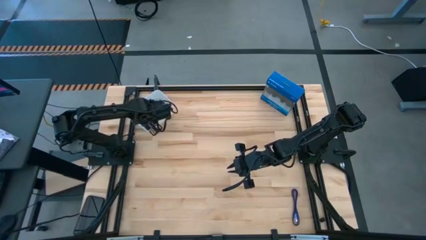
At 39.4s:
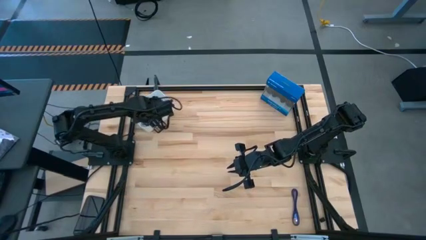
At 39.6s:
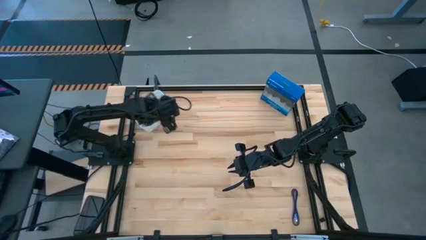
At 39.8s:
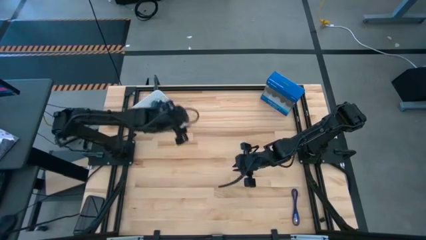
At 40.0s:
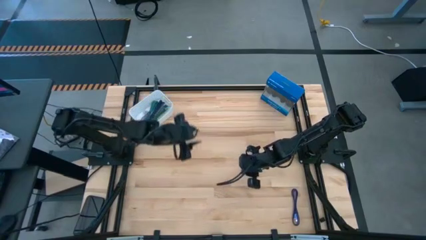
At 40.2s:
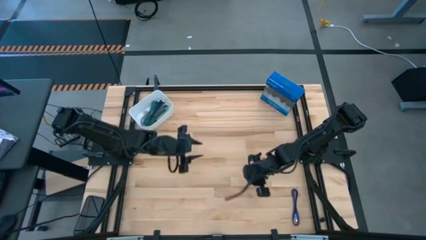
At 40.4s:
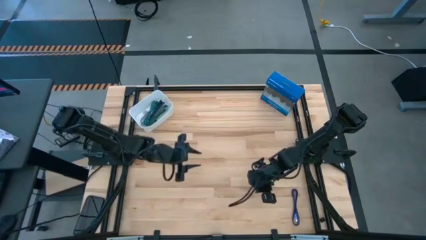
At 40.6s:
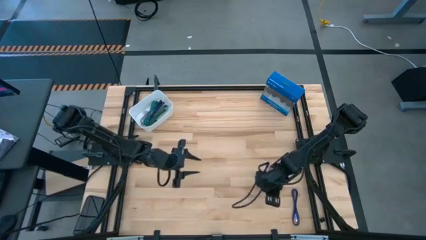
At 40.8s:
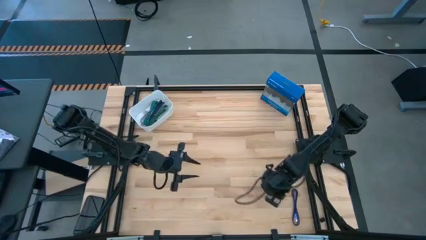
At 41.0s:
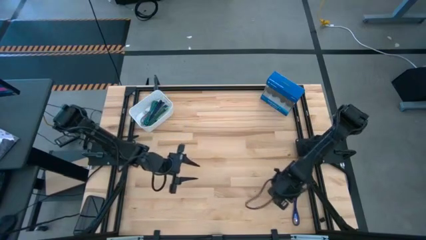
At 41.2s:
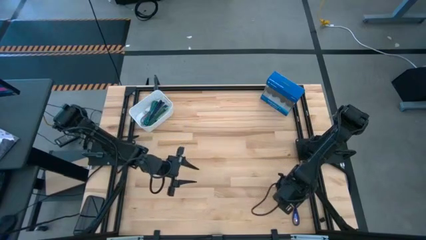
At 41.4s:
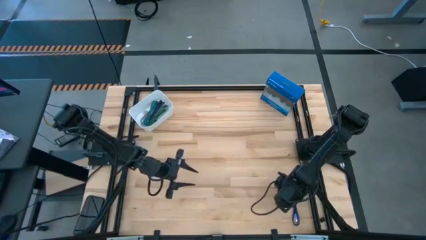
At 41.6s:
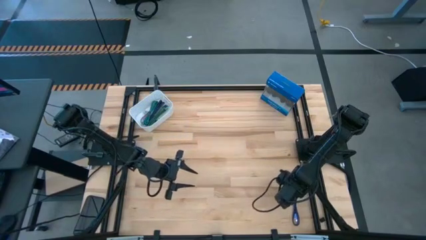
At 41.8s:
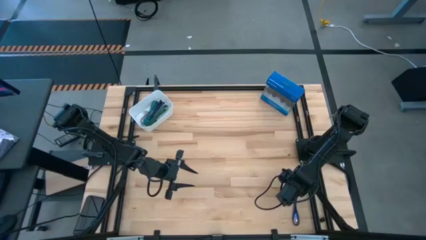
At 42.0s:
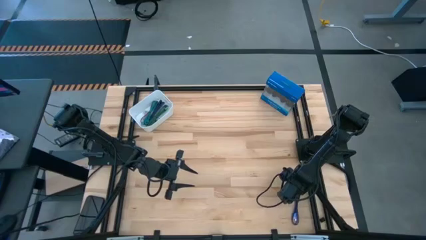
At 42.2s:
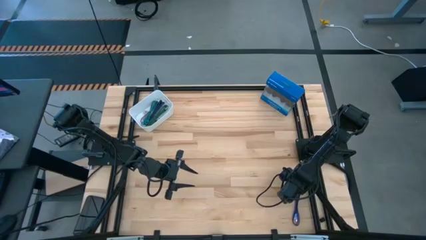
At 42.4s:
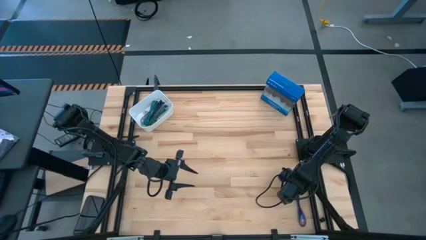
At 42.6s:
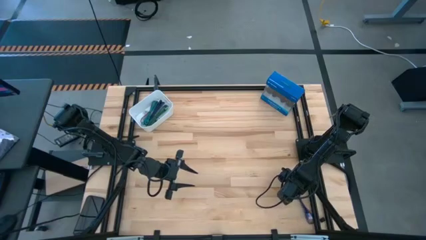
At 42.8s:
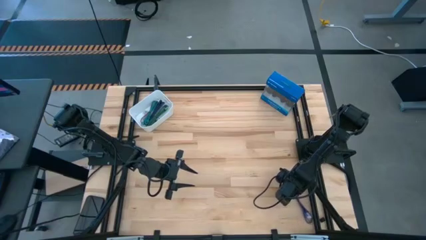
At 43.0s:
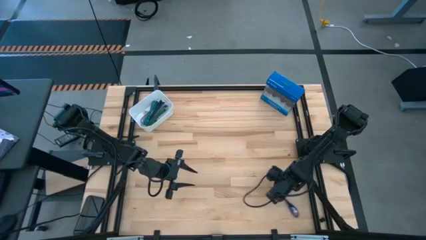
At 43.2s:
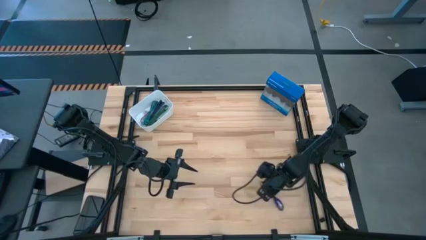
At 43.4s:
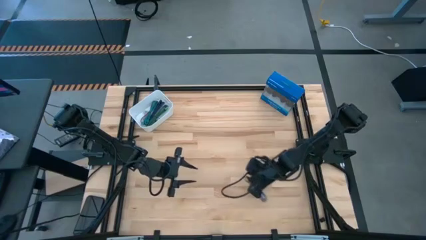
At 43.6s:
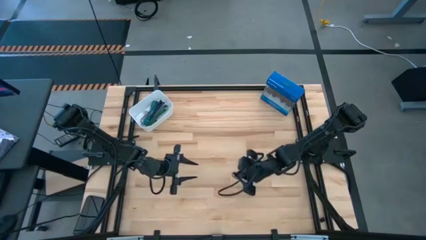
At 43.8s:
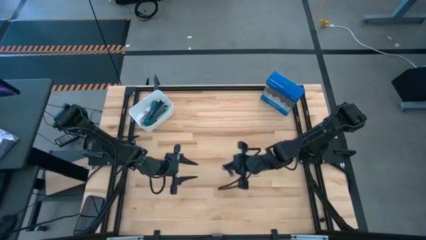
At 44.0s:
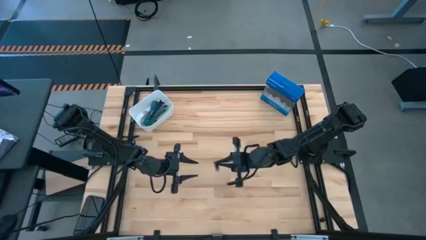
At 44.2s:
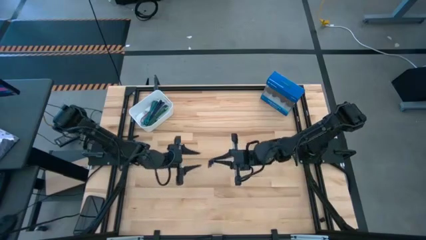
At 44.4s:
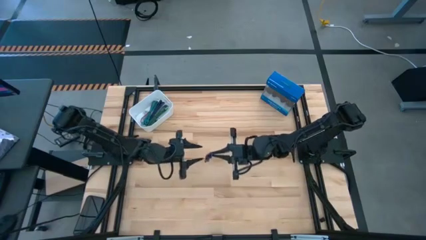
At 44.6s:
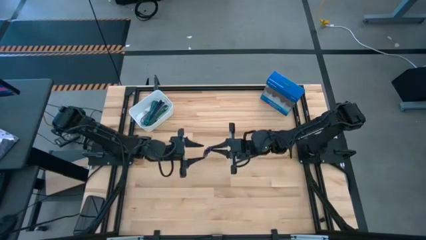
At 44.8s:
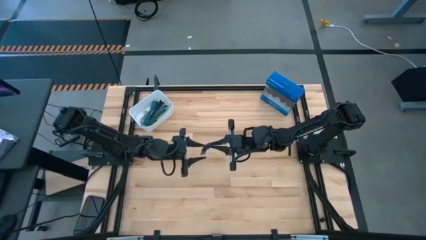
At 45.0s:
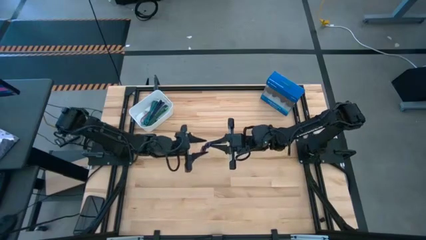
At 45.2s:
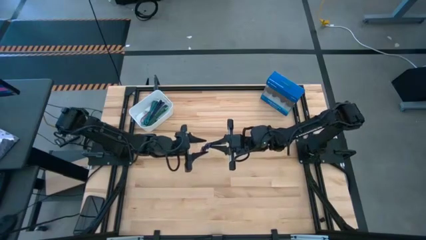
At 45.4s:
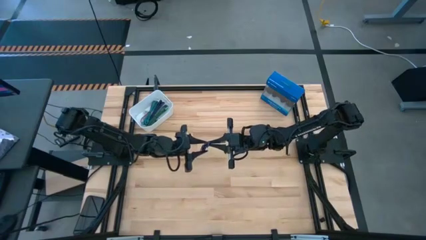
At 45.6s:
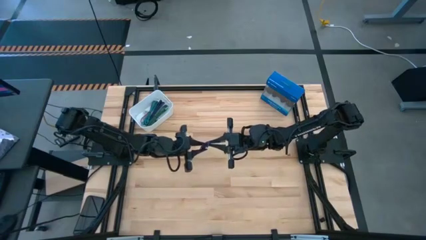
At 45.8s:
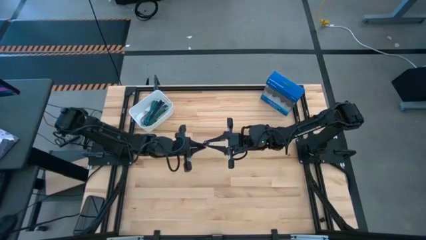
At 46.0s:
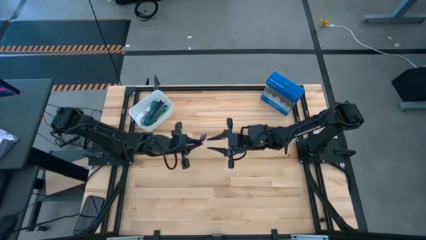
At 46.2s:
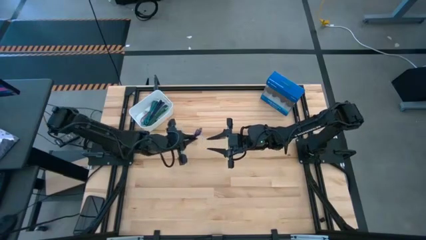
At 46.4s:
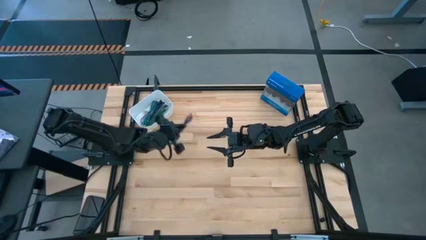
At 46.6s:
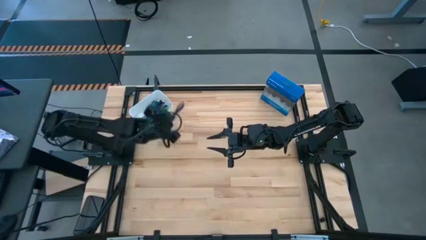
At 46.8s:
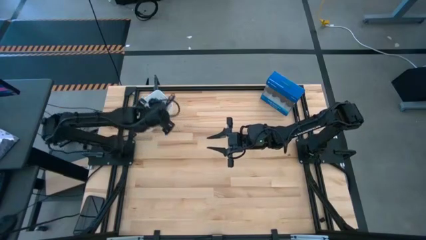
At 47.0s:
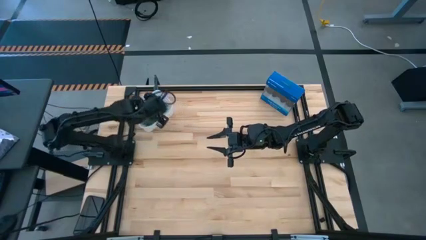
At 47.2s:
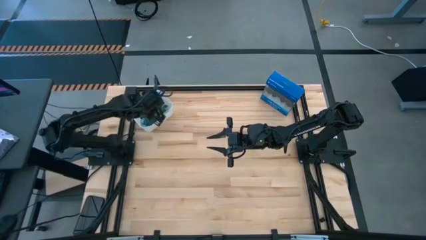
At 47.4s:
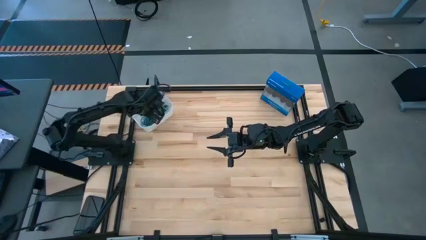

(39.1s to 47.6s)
Task: Pick and place USB-C Cables
Put the purple charger cable into the white bin

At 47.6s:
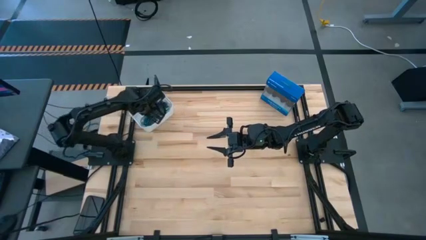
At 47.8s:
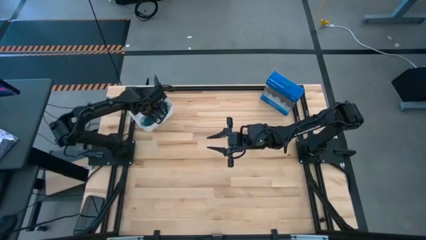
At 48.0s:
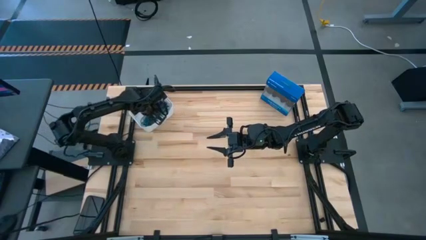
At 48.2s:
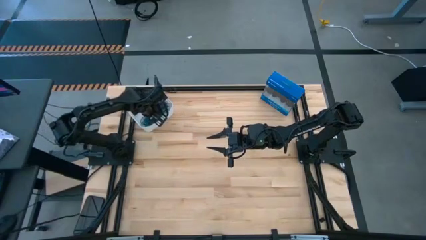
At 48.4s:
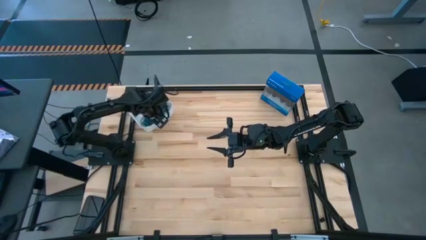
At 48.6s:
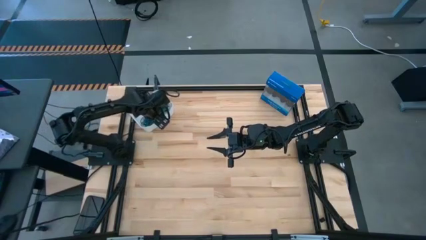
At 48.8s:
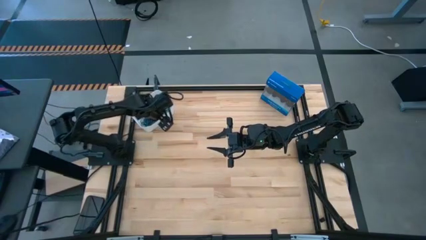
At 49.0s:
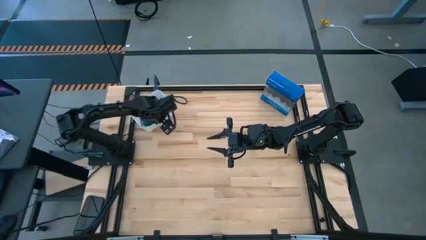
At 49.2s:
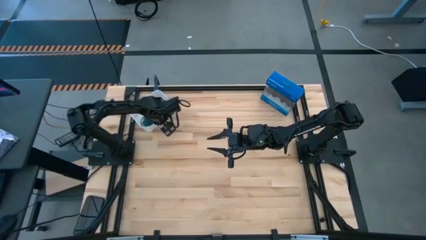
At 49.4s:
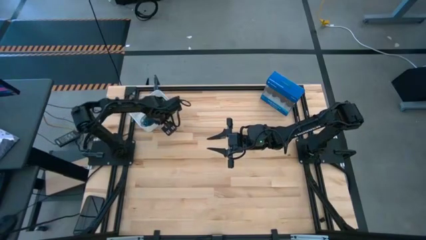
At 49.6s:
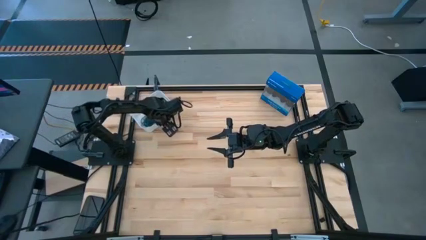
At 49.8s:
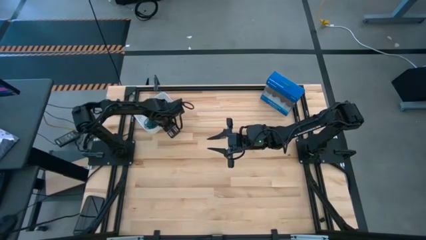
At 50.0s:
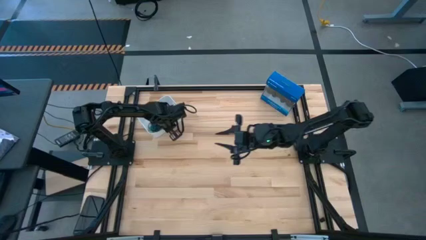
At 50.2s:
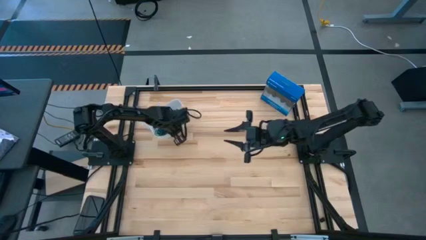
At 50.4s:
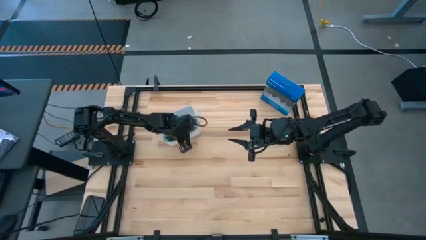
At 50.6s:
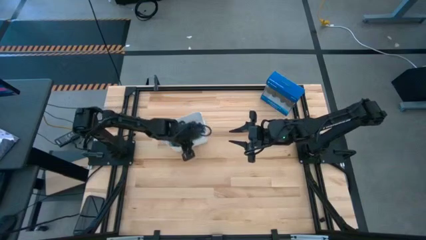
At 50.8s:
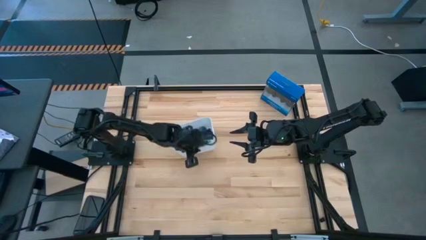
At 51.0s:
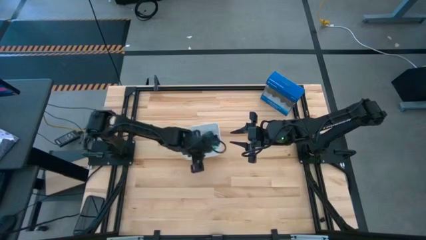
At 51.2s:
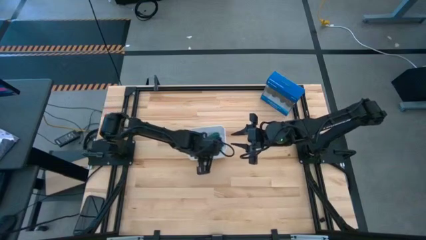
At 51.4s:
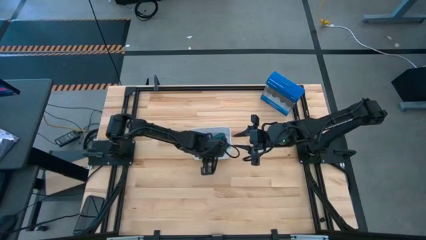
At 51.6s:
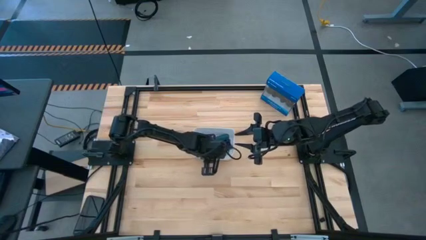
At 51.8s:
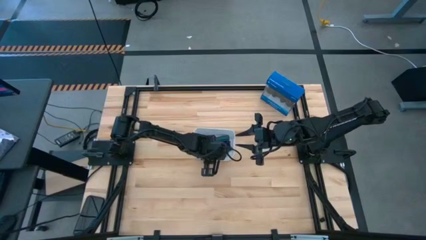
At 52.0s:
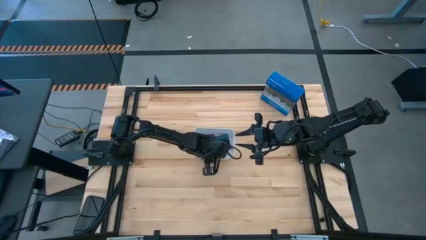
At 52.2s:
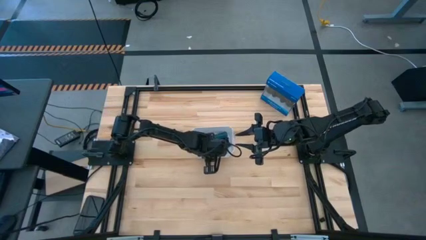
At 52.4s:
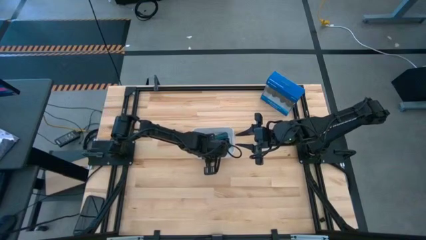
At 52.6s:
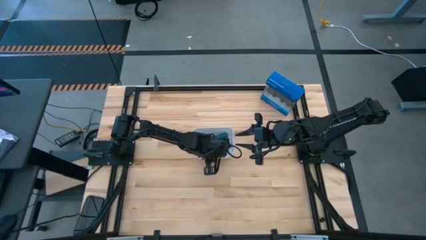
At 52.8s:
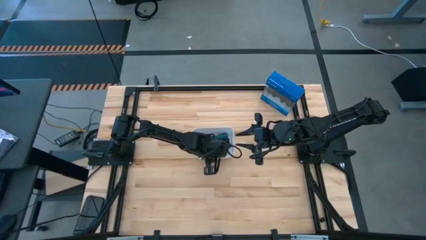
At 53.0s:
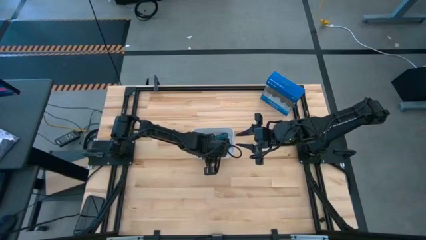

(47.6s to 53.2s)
Move the white bin to the center of the table

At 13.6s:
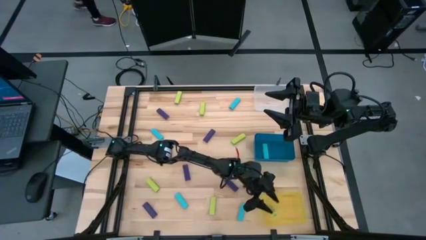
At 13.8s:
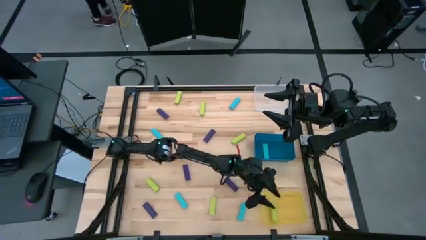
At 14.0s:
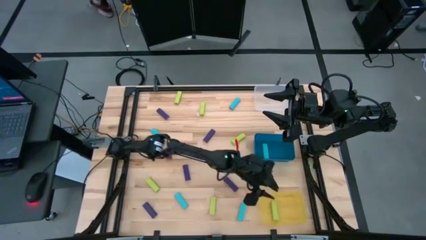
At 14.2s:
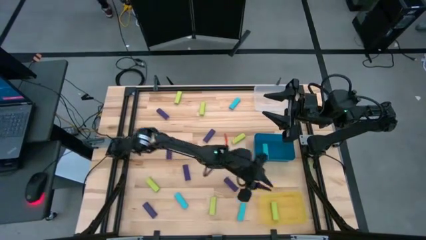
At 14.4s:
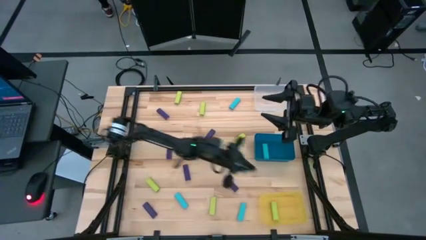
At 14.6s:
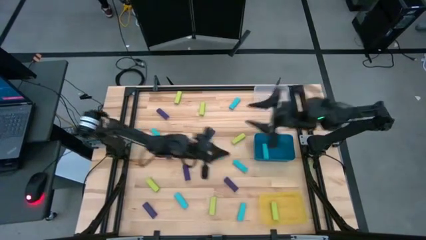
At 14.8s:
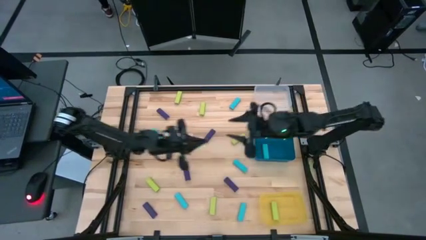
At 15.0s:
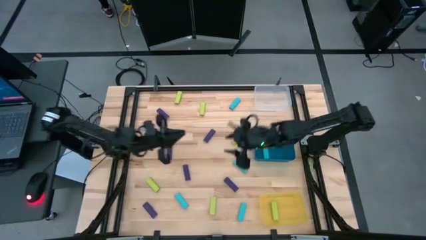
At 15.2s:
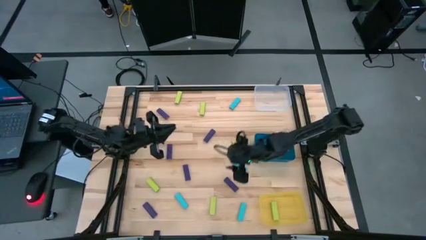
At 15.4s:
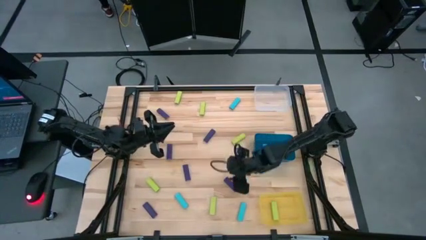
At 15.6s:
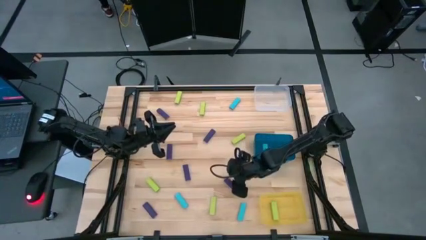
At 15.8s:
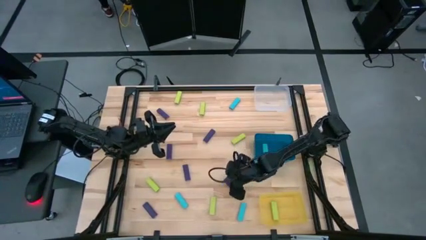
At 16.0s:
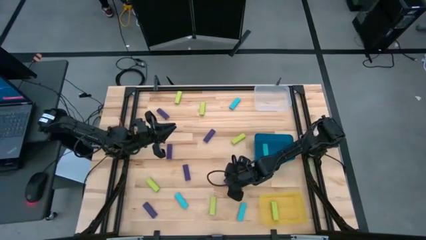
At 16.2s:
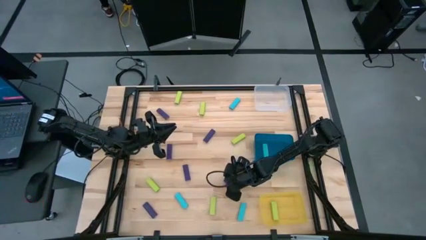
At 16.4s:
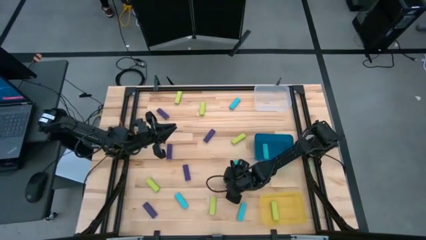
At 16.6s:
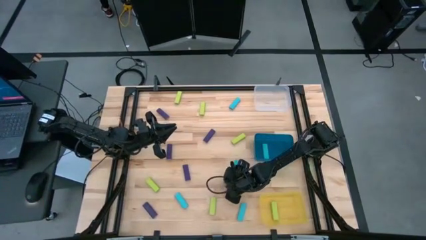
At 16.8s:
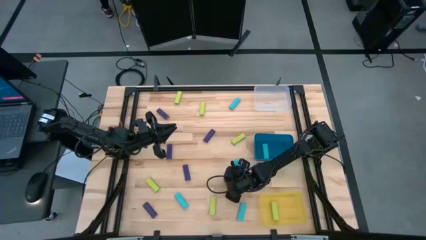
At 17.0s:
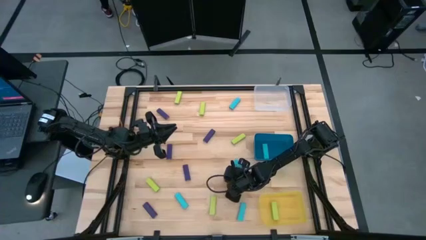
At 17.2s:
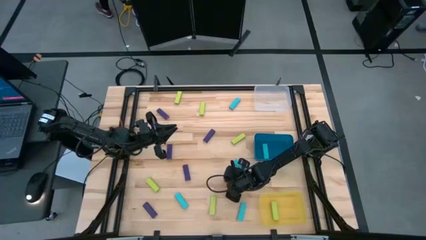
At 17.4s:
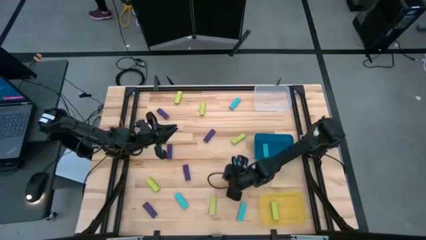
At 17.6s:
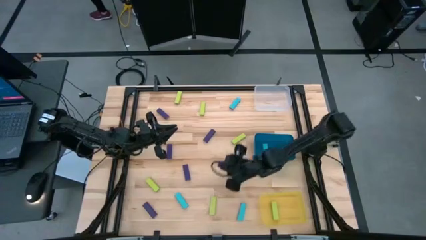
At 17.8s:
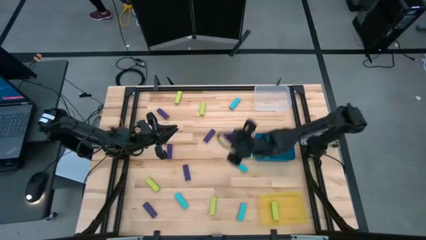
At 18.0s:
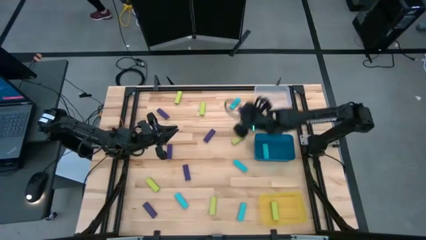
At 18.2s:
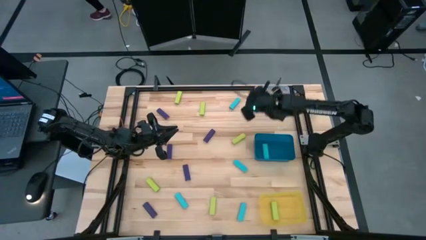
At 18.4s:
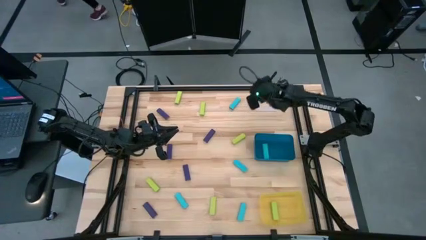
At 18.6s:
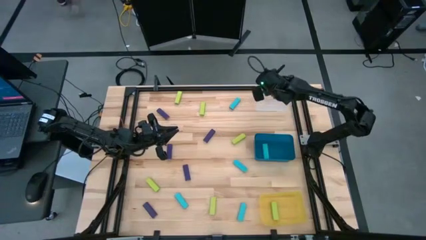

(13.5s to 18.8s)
Task: Sort blocks
Put the purple block into the transparent bin
